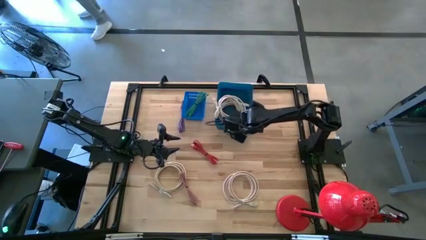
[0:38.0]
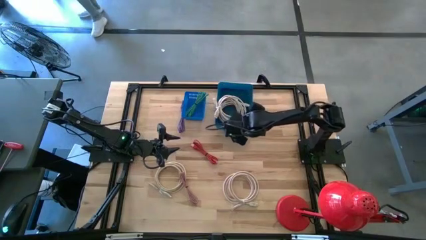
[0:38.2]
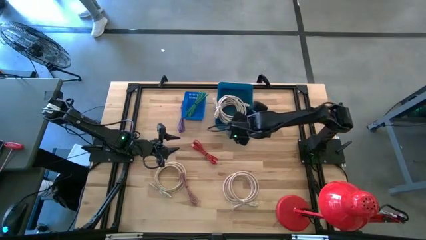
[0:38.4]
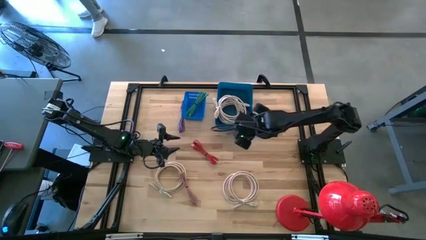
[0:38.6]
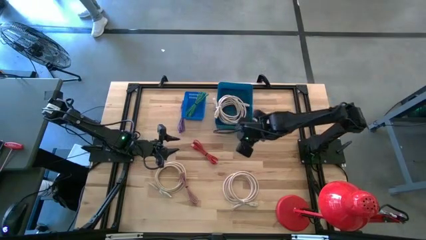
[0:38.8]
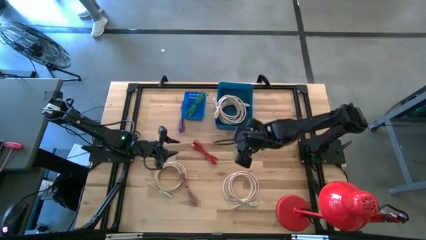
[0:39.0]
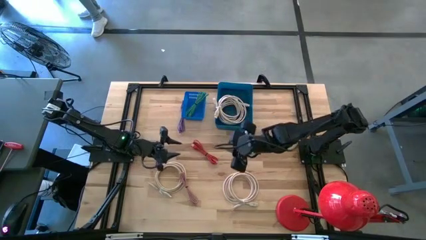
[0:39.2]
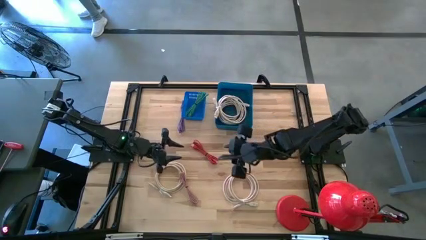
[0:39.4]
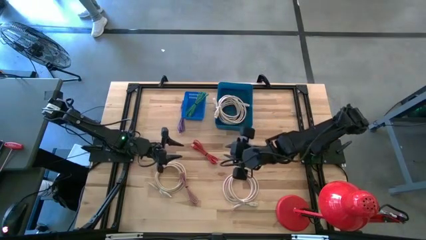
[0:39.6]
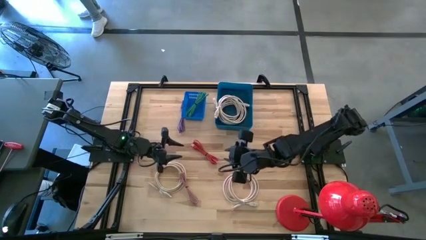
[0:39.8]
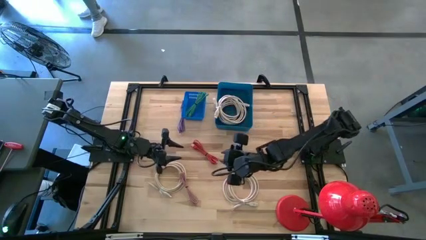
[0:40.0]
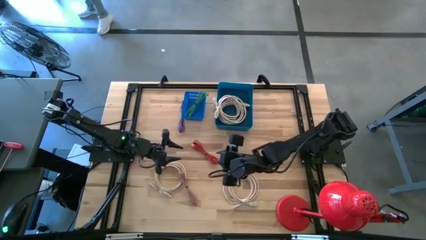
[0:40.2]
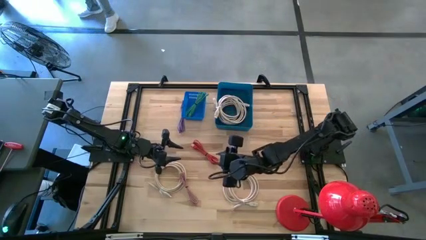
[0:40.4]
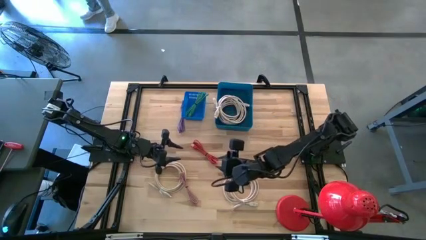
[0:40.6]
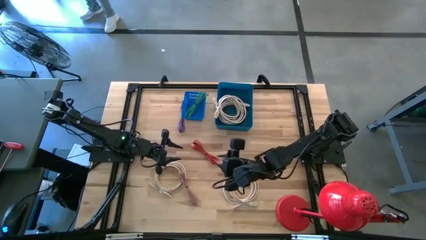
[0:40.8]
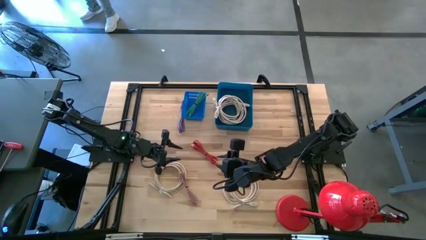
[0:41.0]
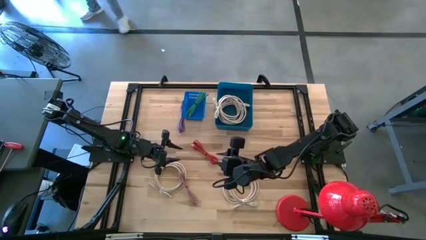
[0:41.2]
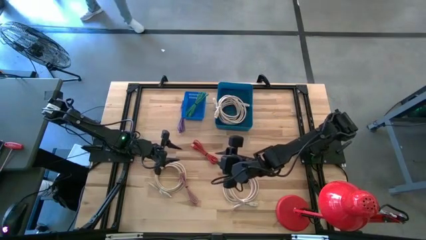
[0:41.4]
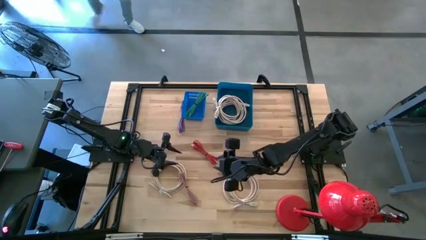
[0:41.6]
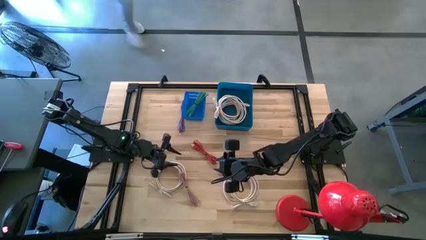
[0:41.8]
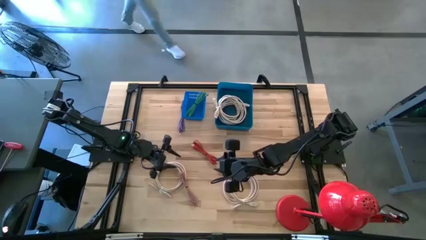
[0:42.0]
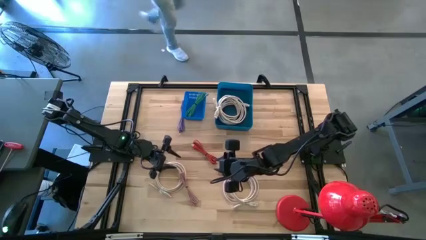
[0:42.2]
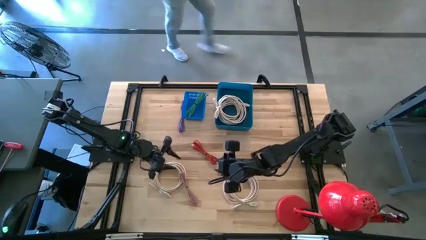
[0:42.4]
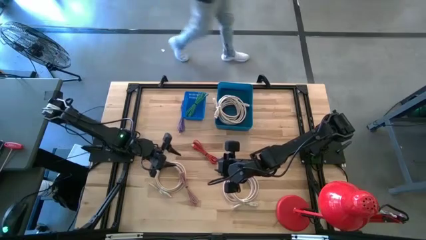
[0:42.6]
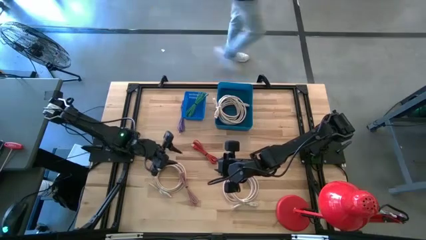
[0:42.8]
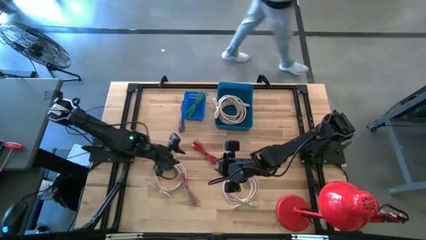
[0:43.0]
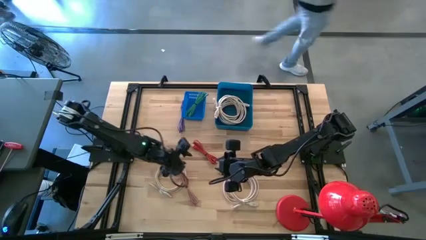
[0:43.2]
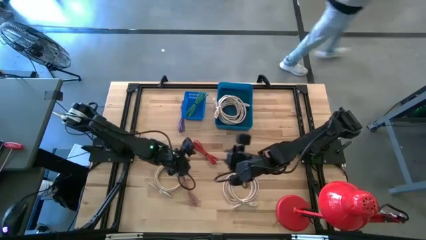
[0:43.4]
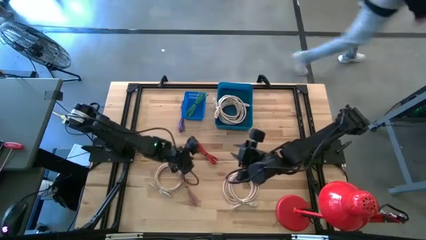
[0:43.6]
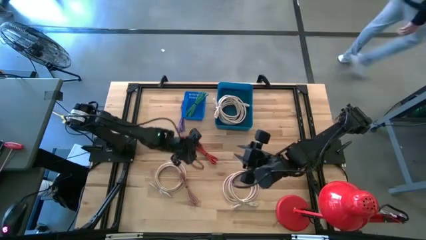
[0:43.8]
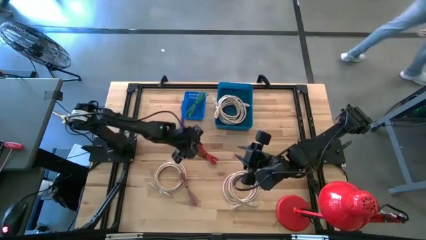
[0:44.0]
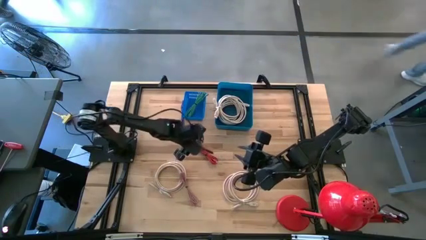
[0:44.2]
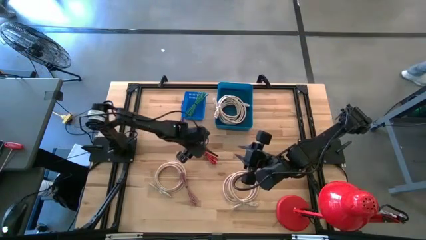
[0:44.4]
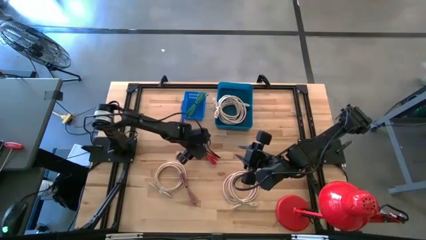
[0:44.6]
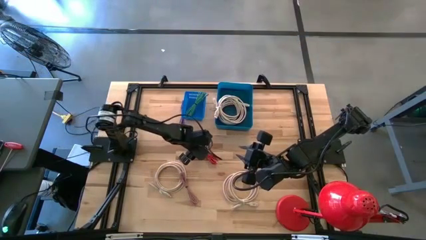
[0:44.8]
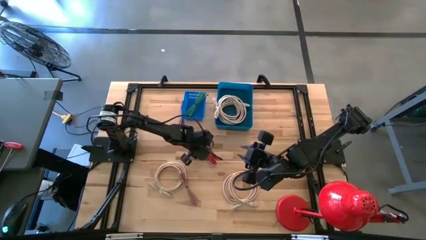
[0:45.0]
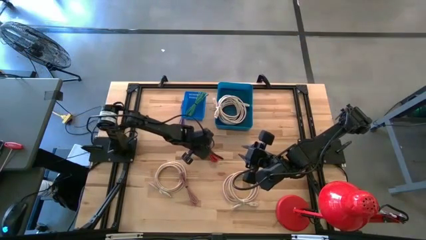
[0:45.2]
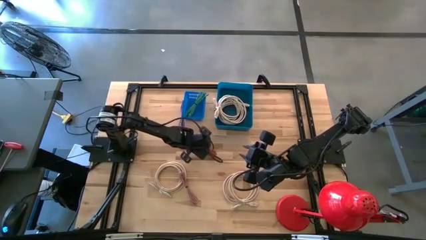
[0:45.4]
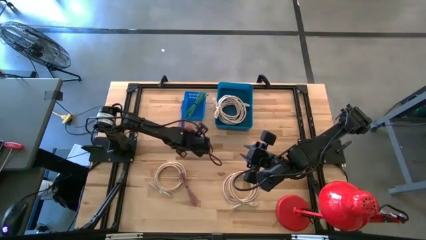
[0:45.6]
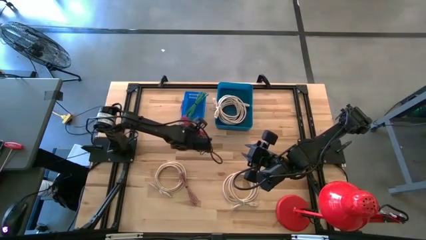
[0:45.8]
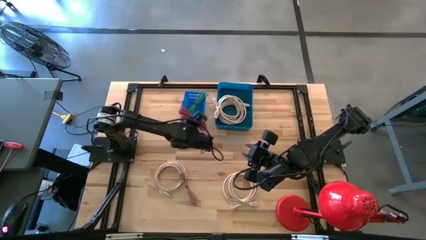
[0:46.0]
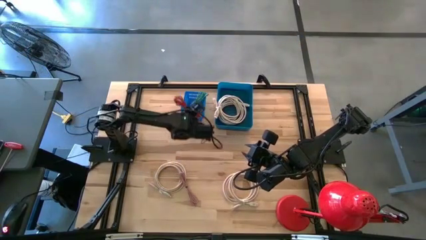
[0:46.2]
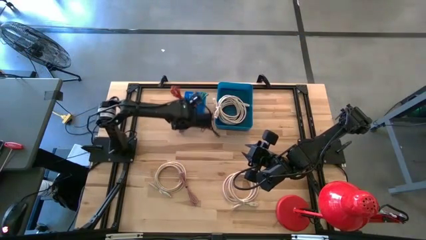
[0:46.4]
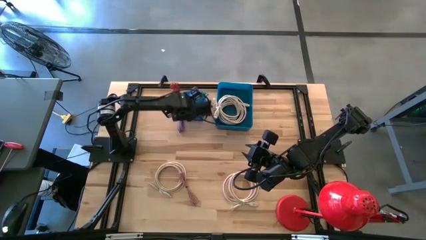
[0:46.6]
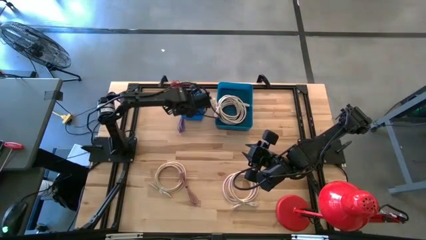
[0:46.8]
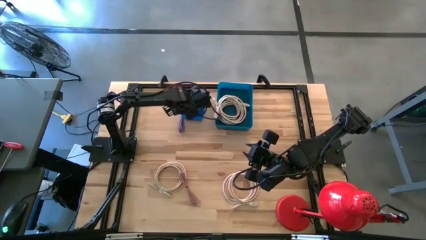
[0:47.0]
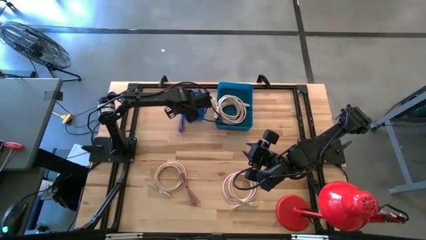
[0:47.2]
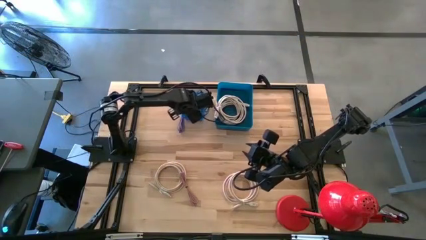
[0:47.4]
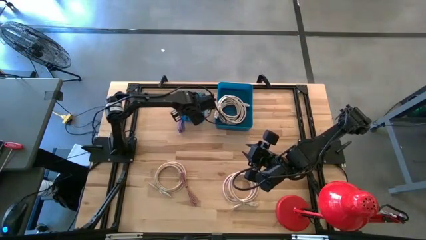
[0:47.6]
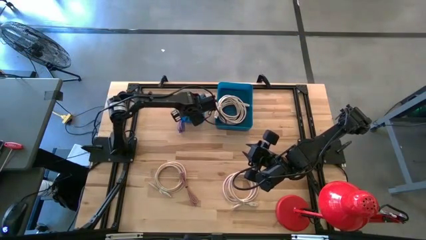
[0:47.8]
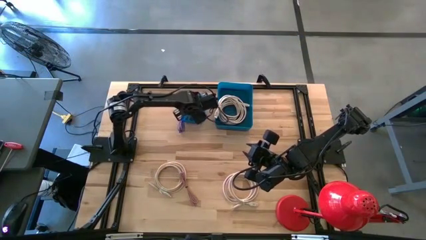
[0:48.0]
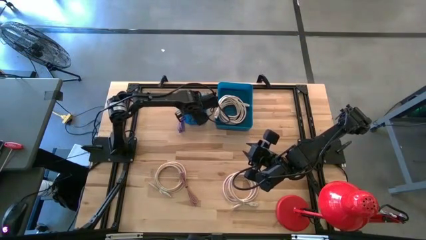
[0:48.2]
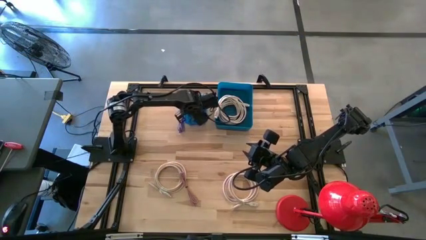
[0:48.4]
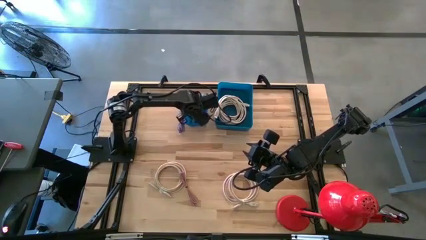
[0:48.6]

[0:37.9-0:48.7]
Task: Pick & Place USB Port
Put the orange charger cable into the blue bin
